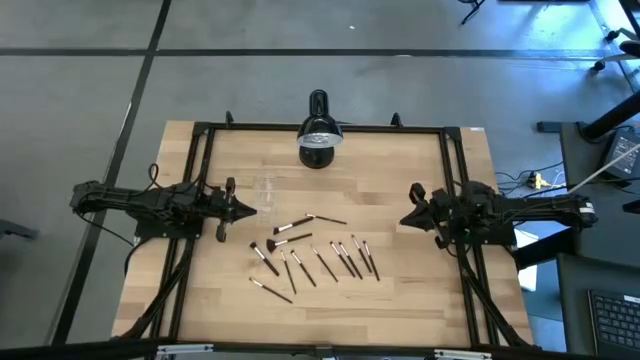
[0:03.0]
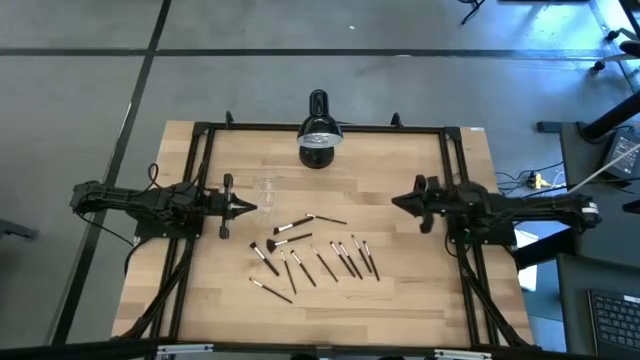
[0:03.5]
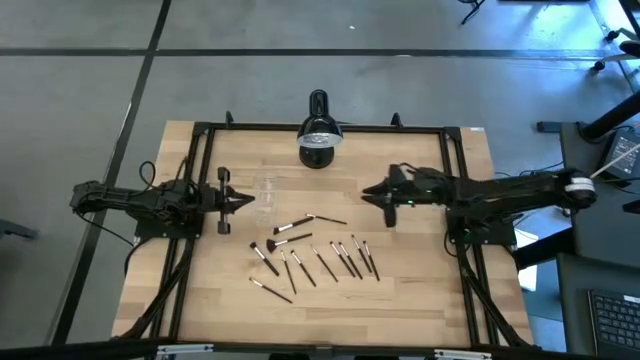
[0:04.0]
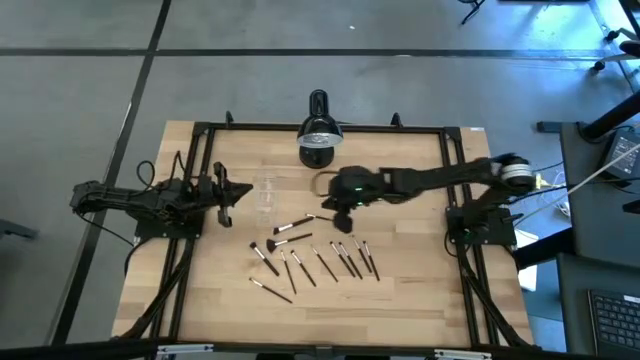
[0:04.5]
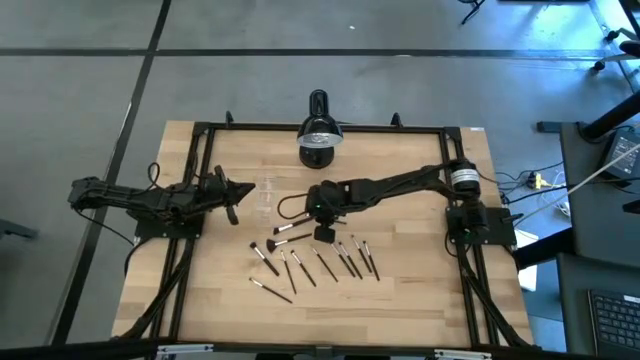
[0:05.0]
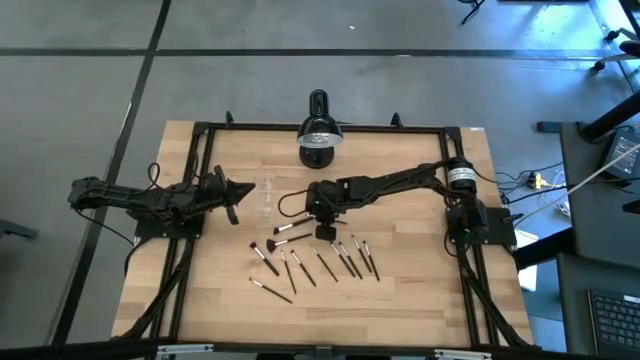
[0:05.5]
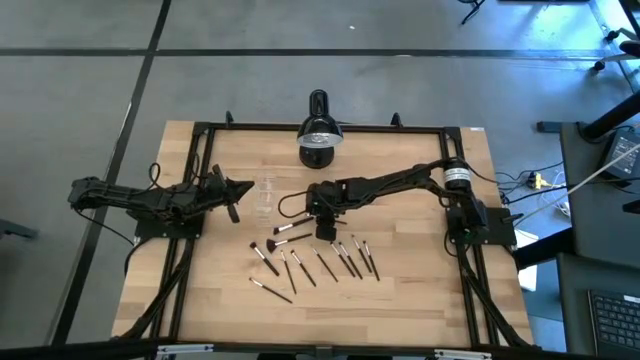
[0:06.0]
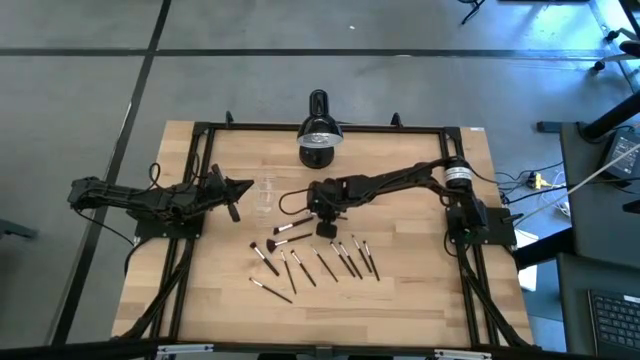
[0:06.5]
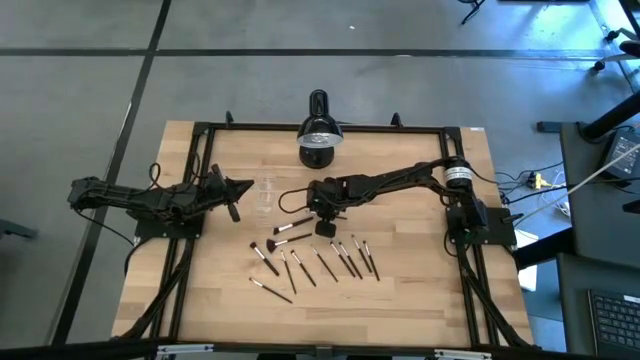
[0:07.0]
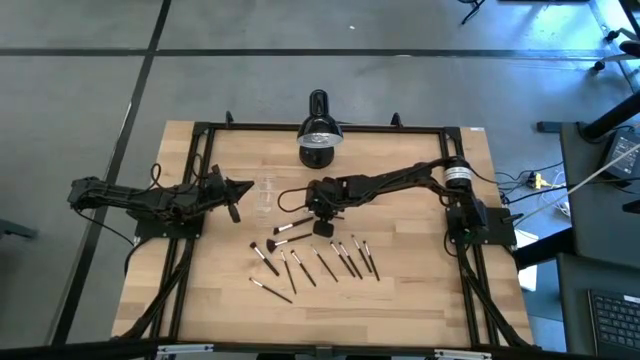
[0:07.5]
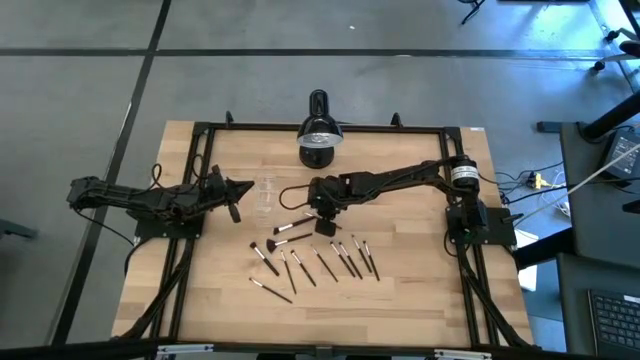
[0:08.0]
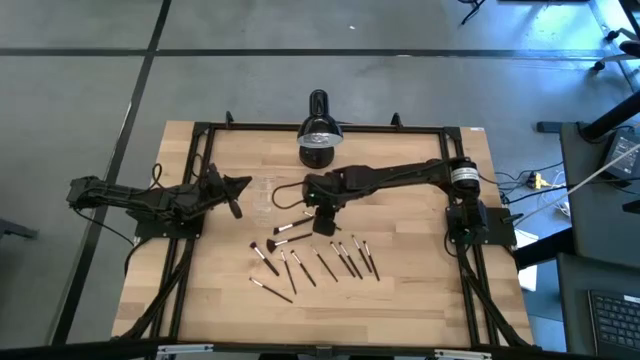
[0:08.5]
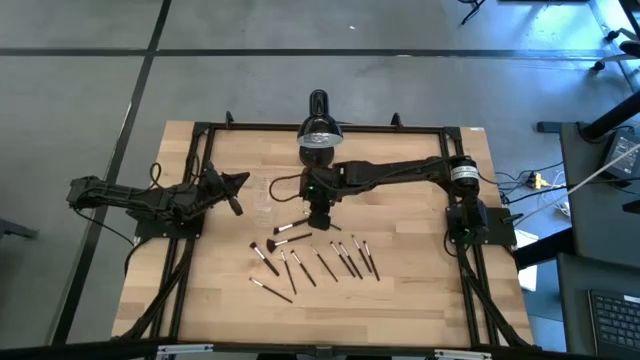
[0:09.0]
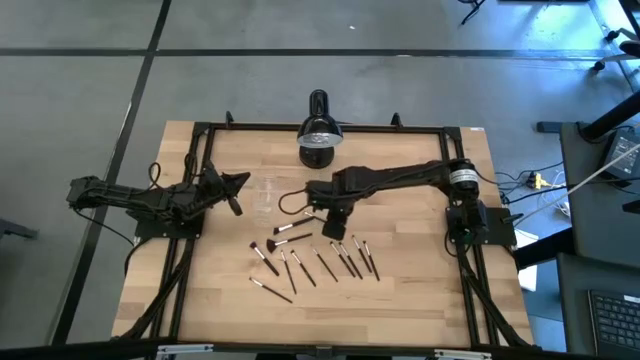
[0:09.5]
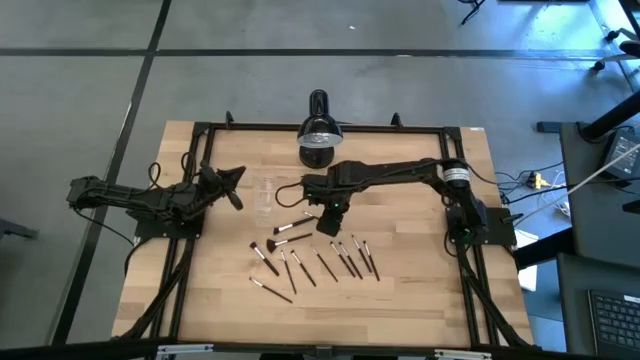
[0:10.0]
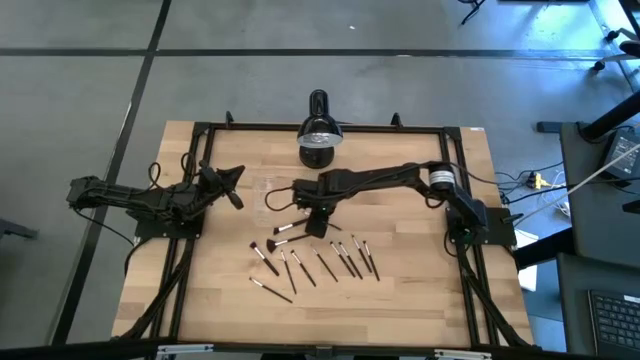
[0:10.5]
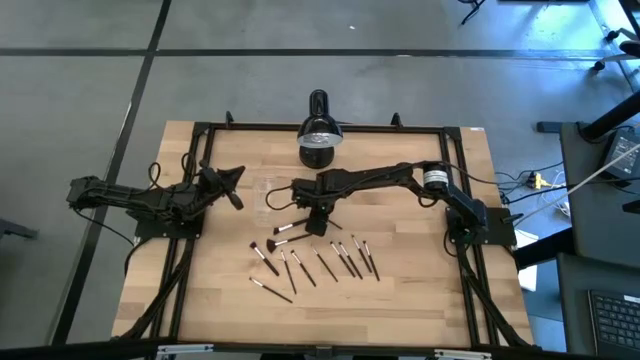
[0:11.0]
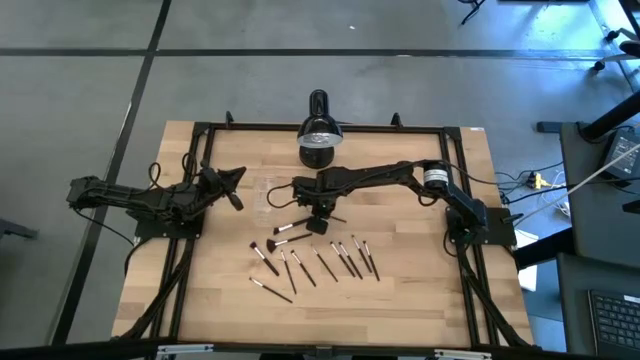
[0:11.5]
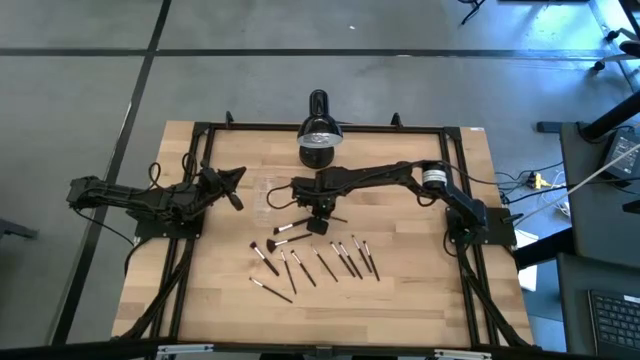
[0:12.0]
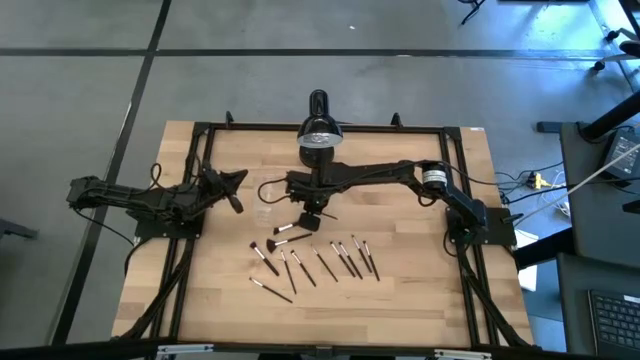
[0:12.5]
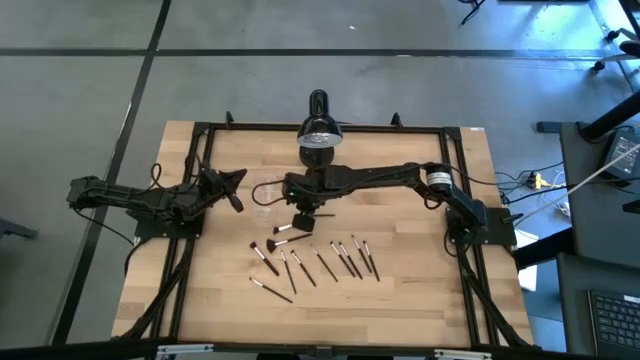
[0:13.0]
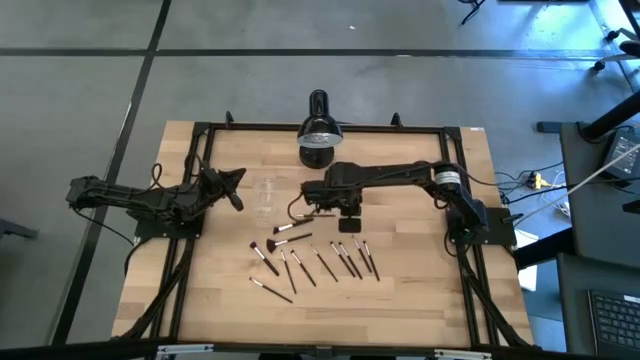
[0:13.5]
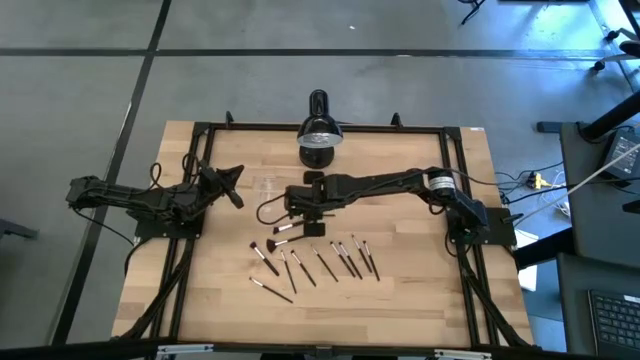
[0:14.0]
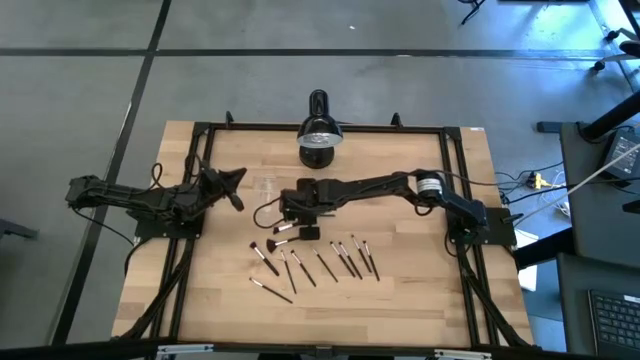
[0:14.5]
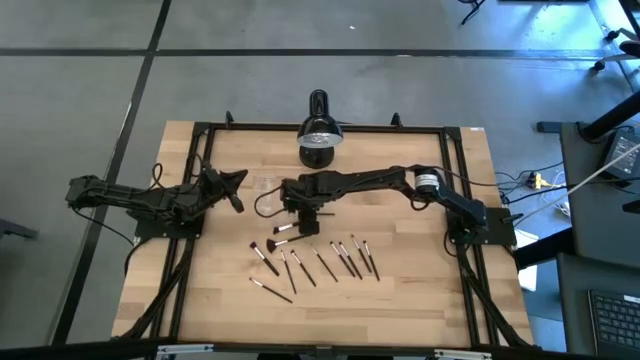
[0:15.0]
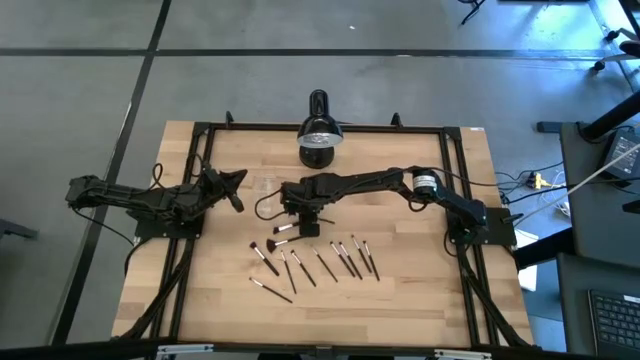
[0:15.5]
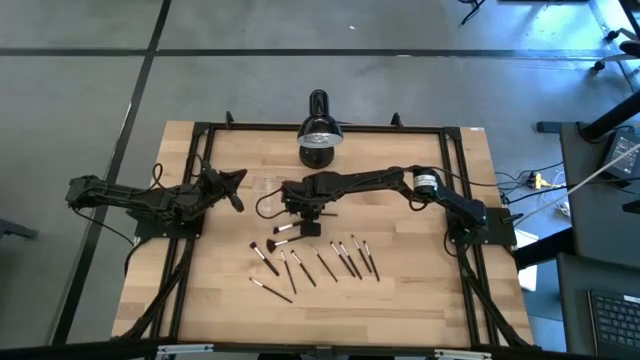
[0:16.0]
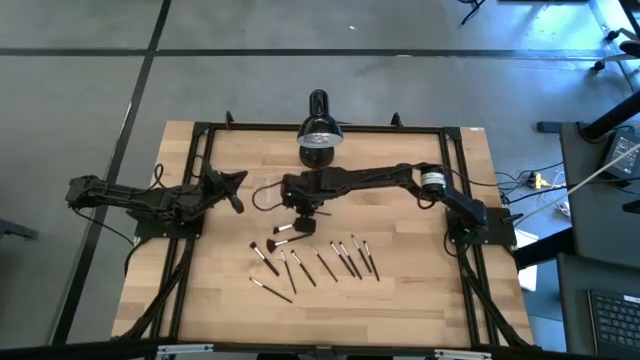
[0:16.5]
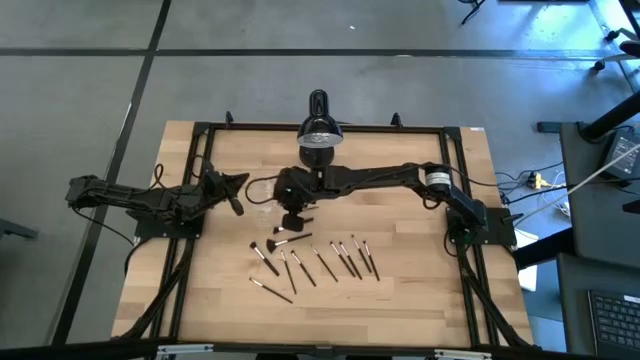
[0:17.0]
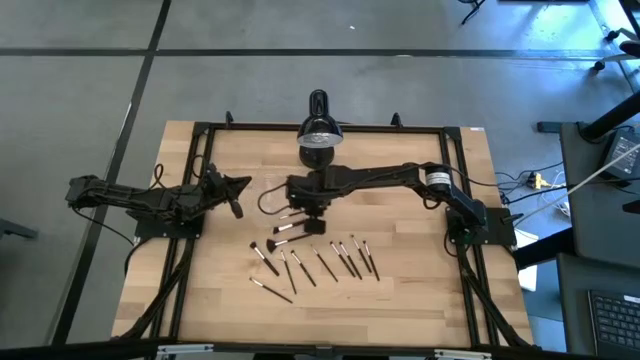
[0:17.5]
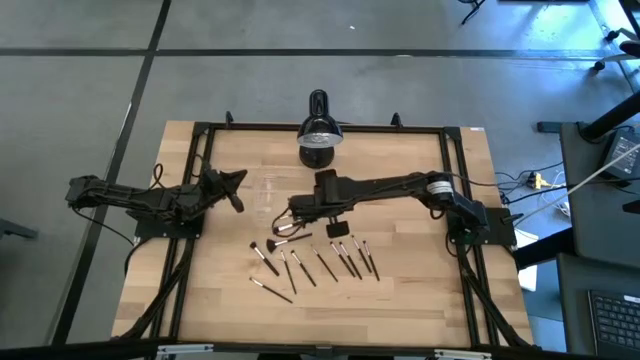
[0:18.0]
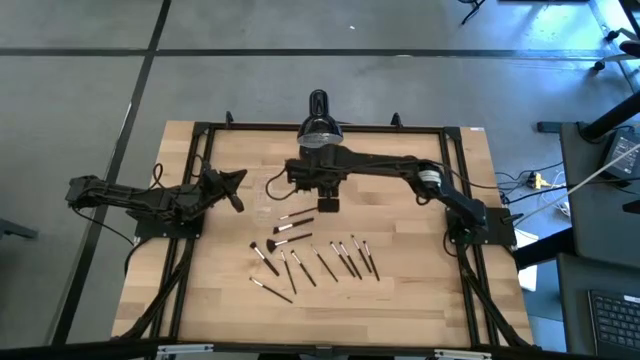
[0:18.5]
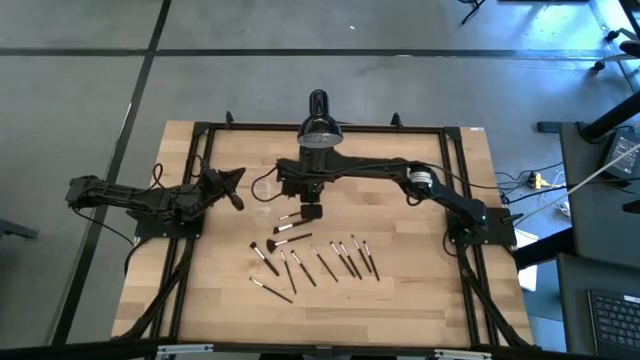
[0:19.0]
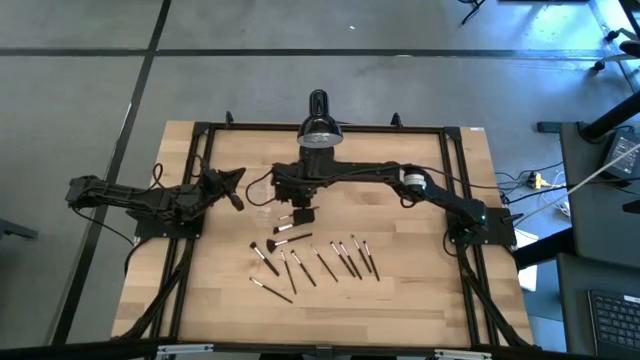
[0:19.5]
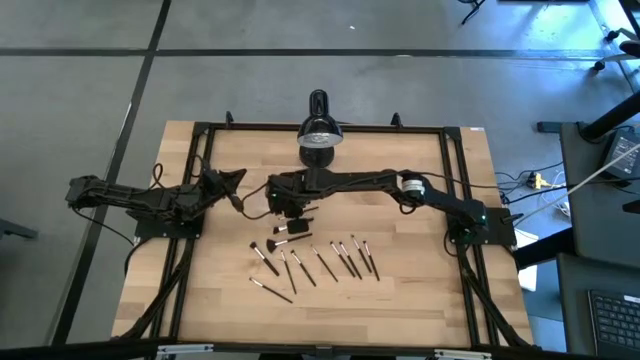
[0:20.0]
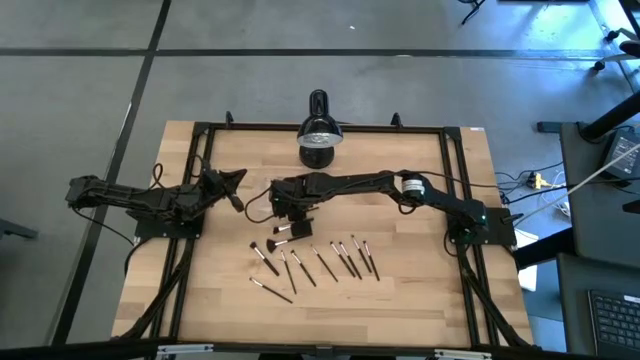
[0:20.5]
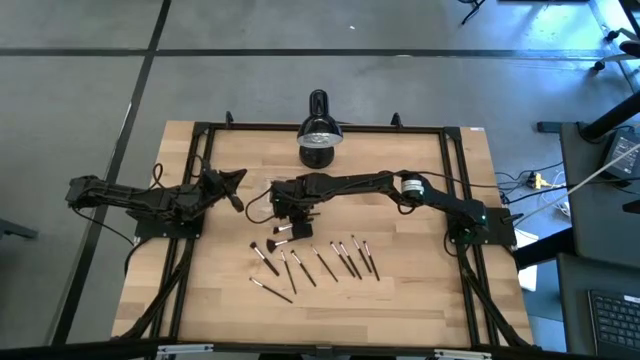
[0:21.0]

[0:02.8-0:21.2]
Task: Sort items
Put the eye liner brush into the transparent organizer

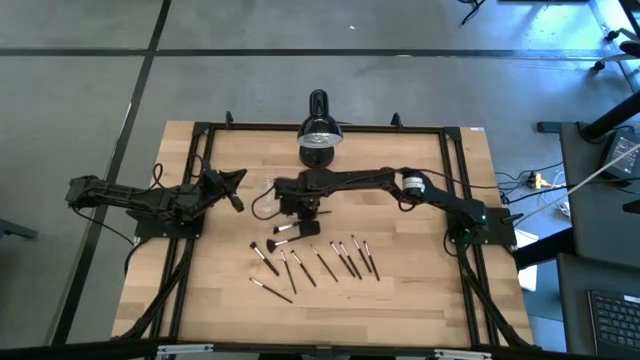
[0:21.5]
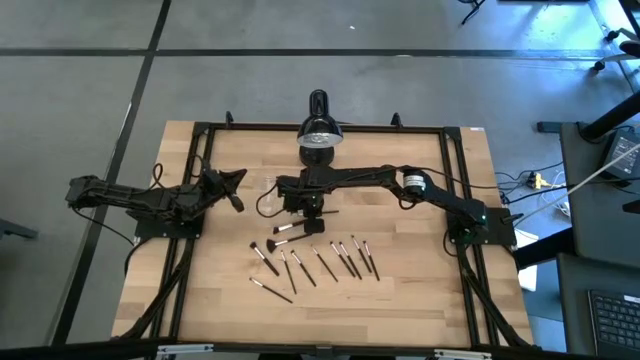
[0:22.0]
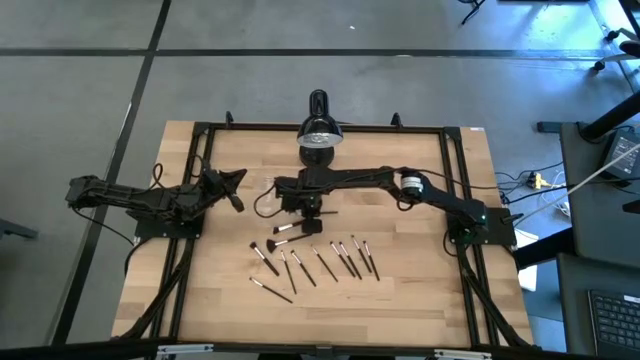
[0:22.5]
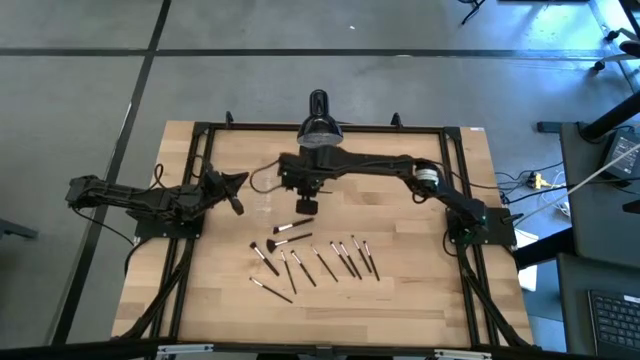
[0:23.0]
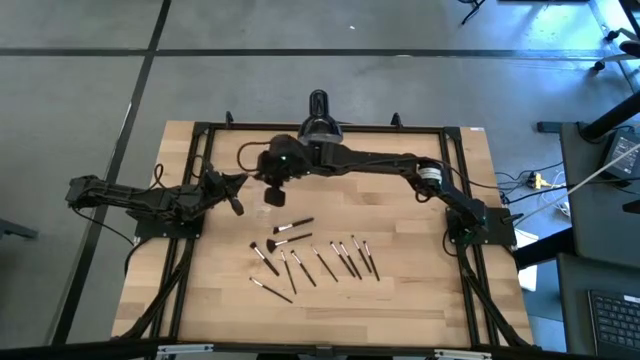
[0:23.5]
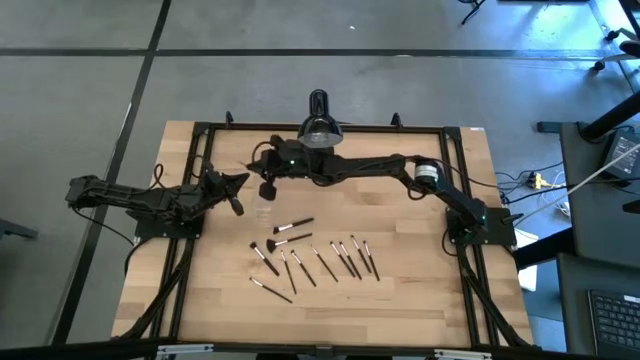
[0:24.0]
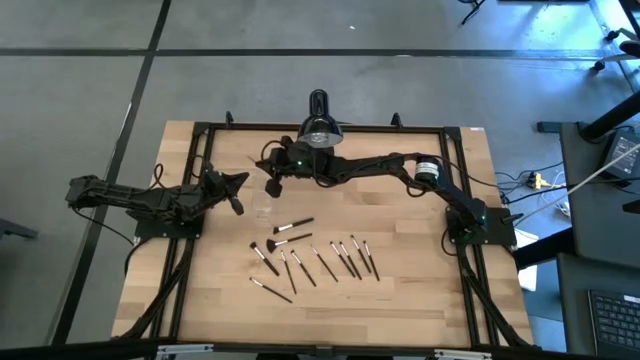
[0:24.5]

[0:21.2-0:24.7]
Put the eye liner brush into the transparent organizer
